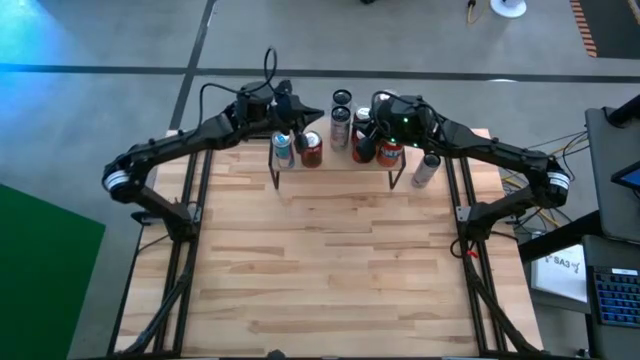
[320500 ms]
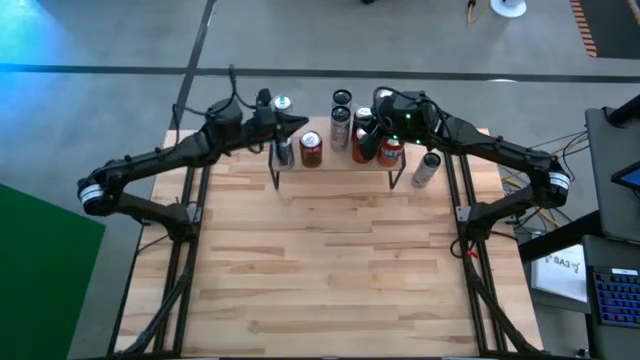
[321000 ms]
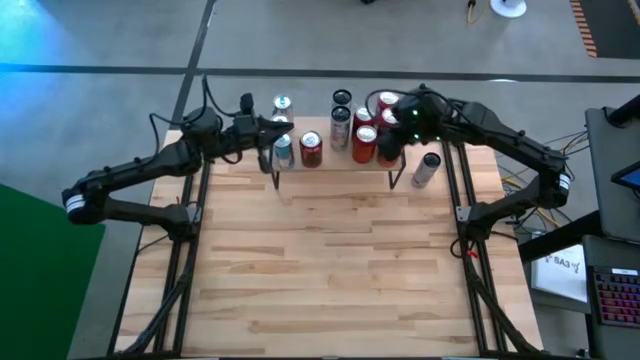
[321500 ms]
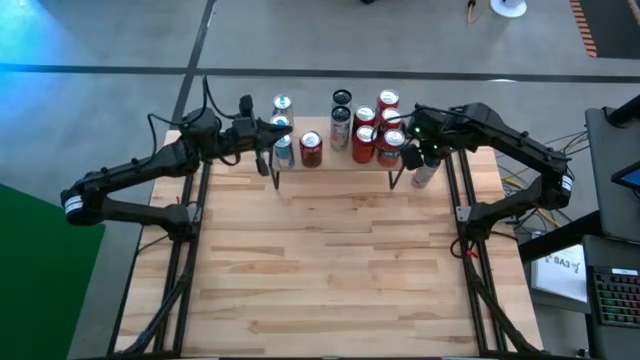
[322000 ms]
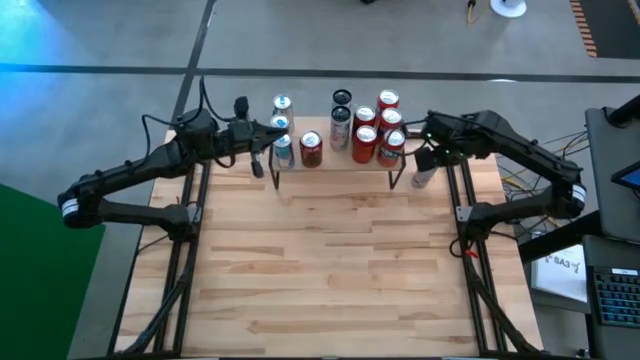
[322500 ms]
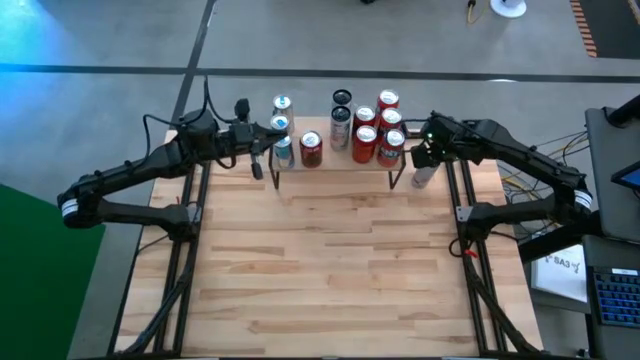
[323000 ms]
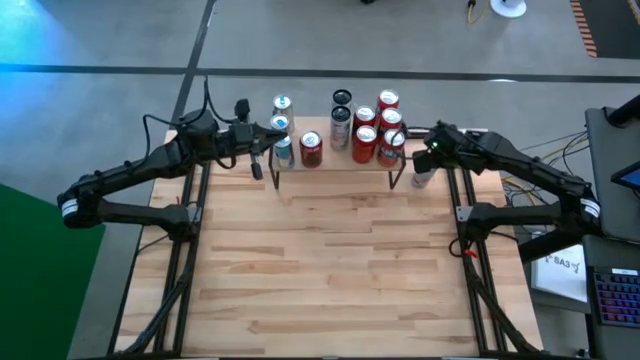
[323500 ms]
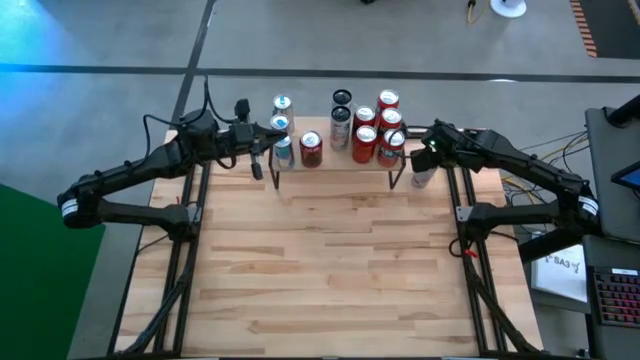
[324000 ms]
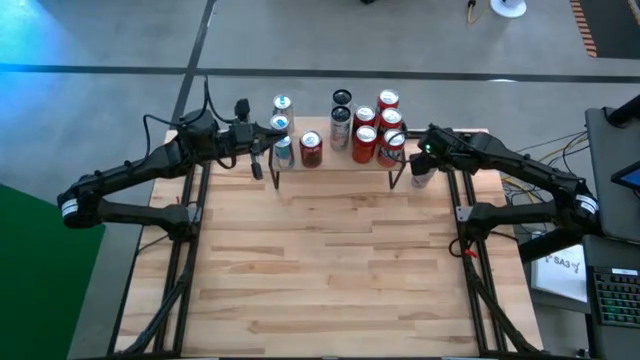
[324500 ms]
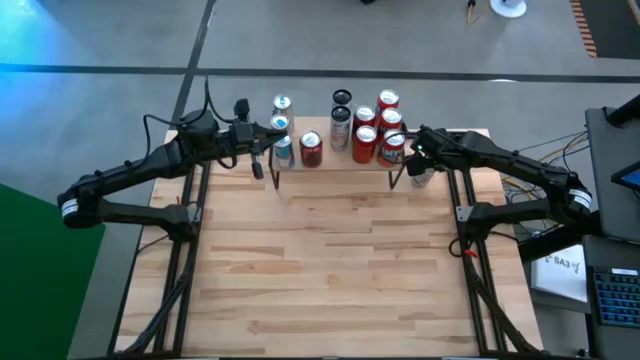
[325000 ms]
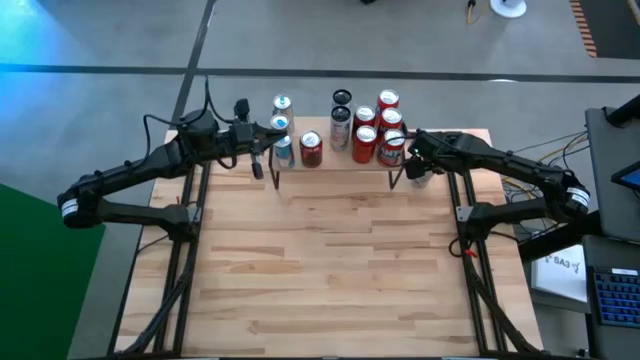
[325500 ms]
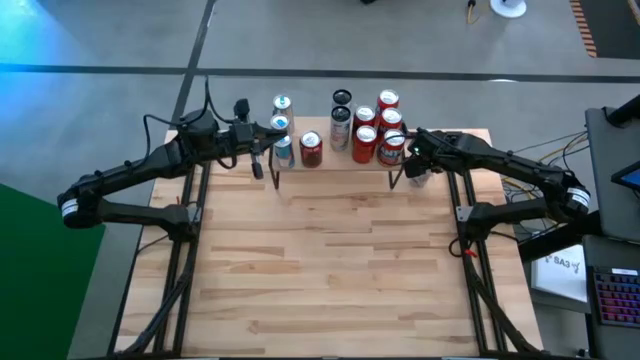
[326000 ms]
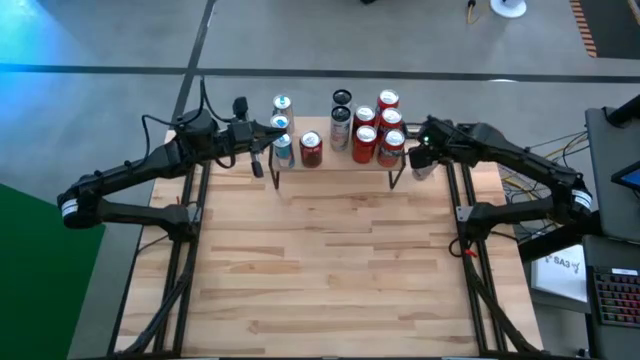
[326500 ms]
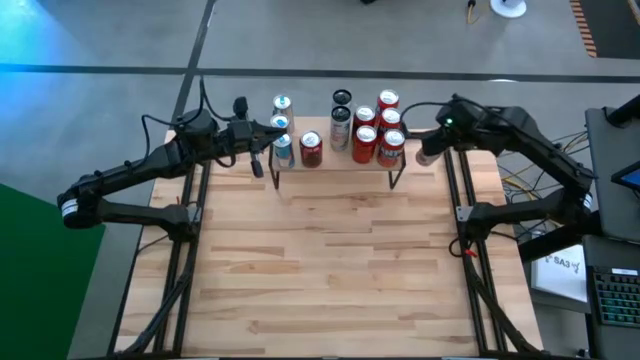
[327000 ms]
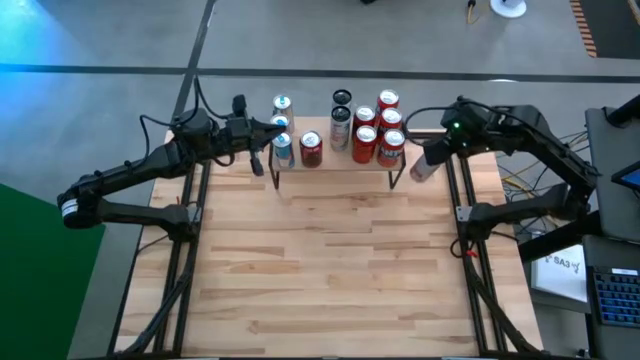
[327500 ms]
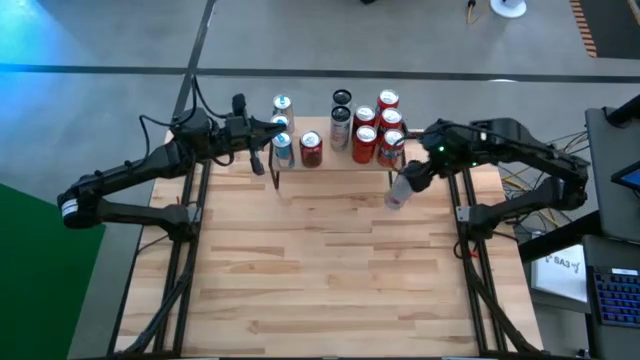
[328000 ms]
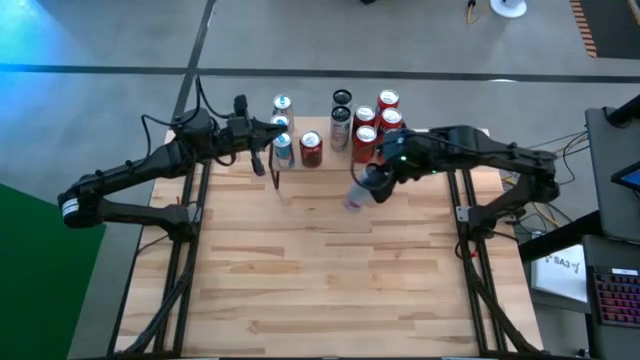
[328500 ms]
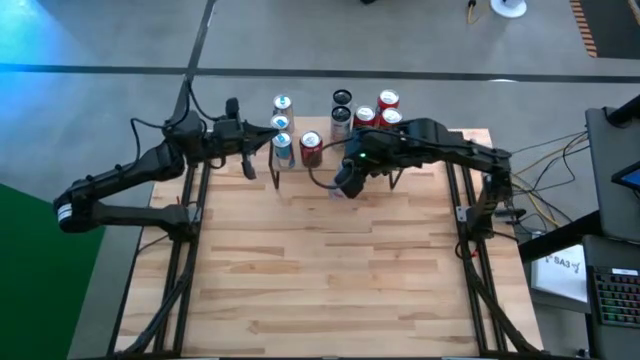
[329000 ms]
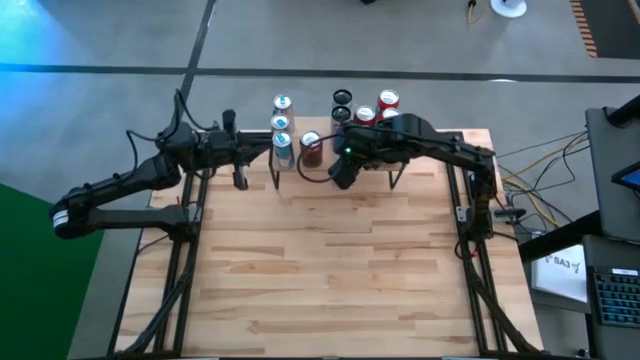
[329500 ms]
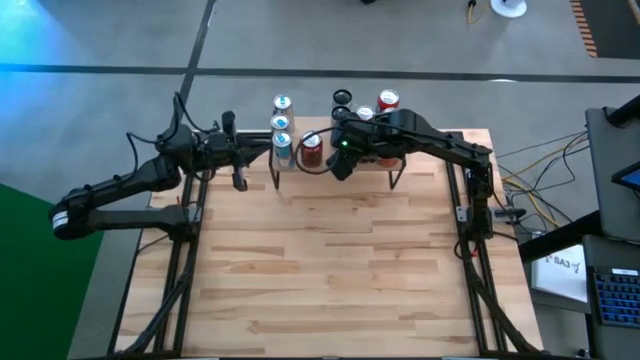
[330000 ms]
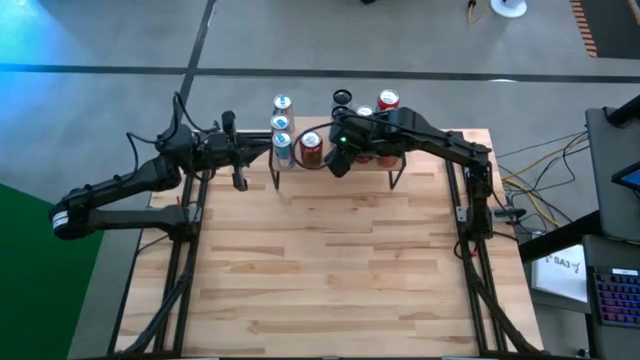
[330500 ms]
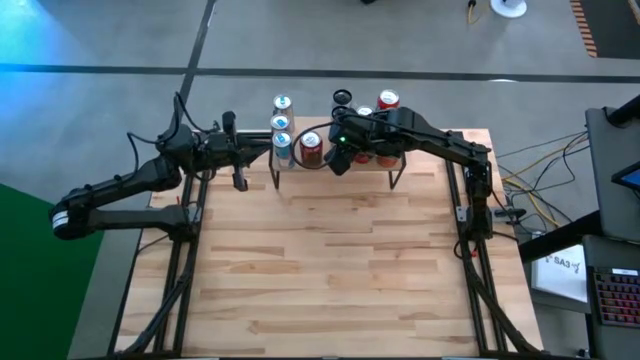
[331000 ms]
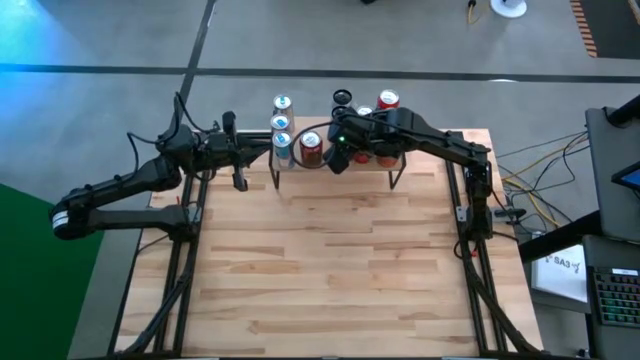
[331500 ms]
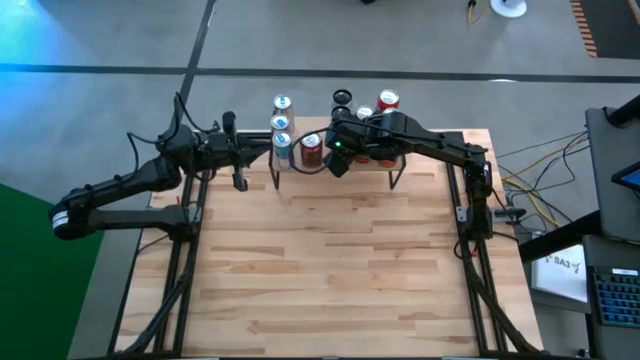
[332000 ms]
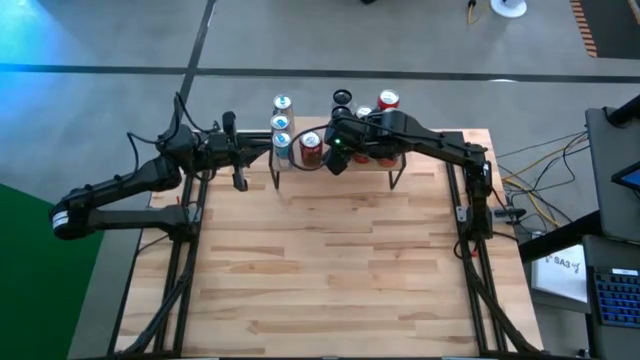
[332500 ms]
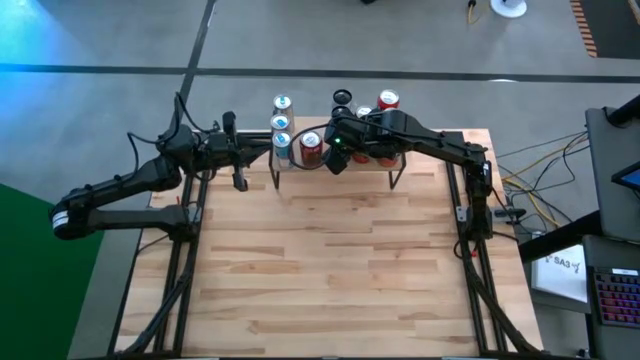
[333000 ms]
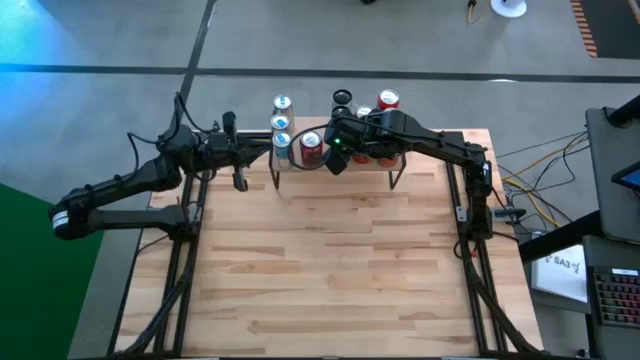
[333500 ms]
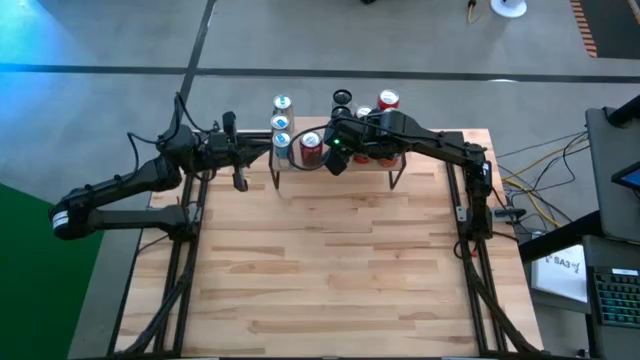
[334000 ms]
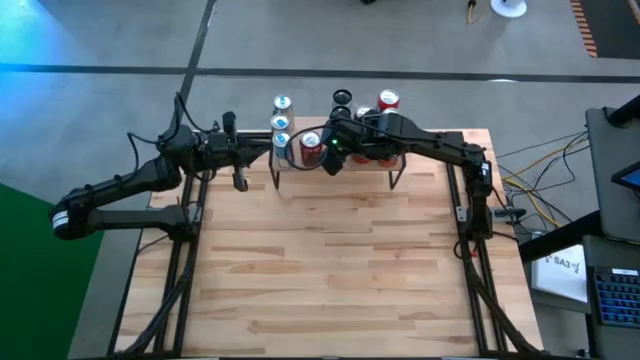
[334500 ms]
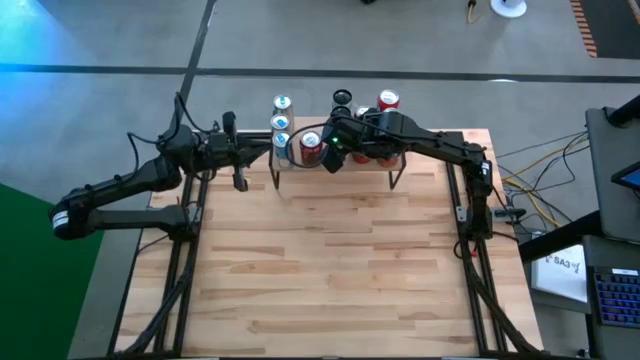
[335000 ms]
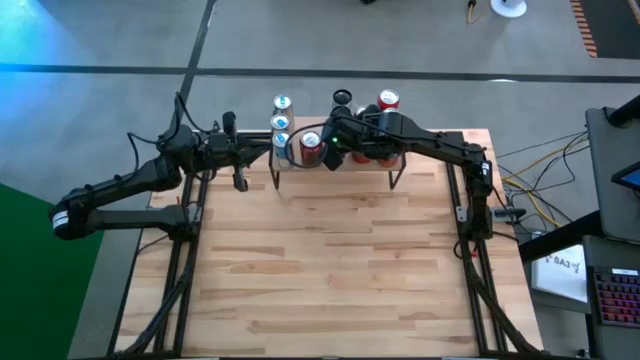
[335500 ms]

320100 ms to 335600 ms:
Task: Place canned beverage on shelf
Put the white pink soda can on the shelf

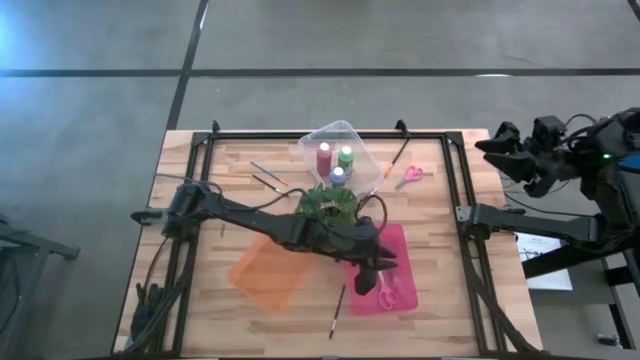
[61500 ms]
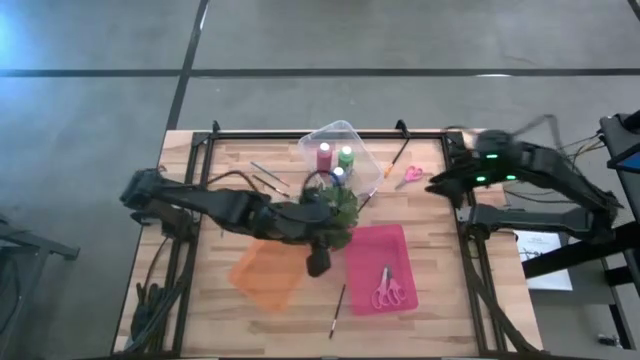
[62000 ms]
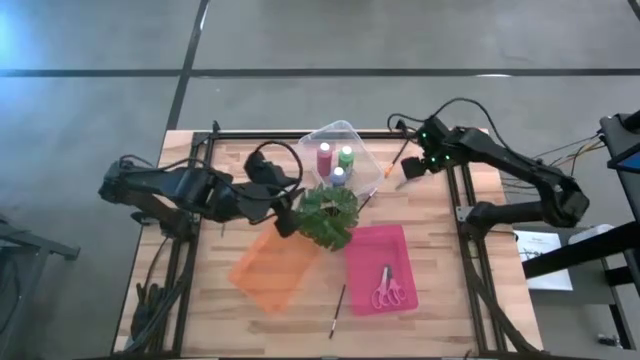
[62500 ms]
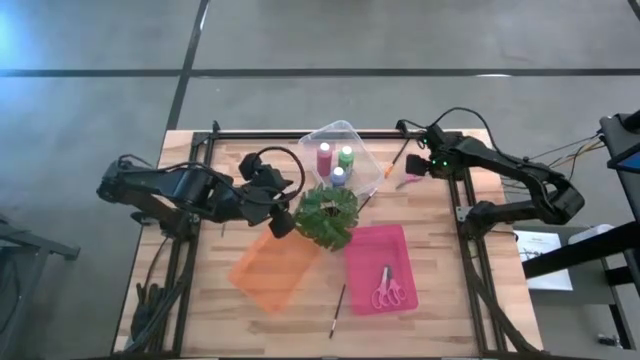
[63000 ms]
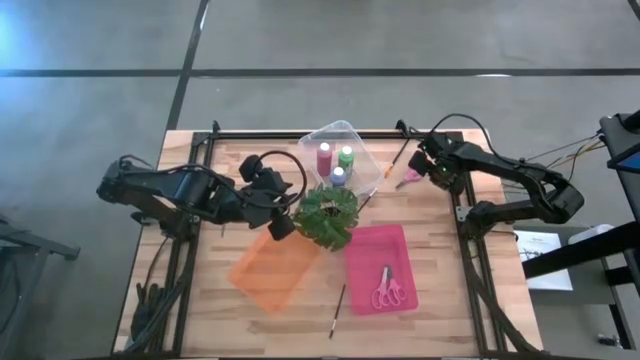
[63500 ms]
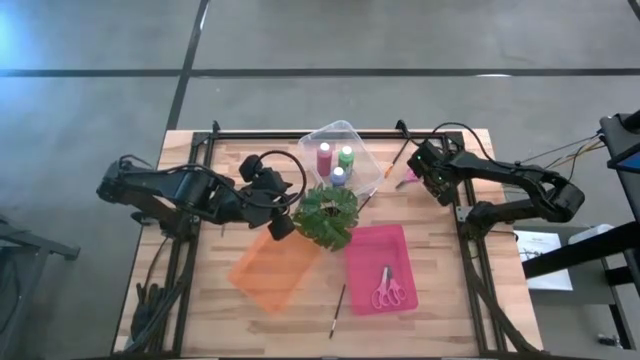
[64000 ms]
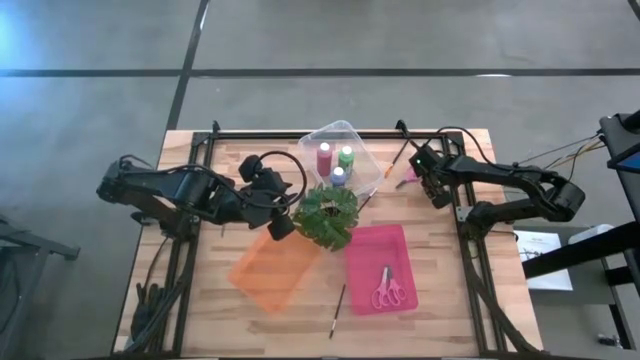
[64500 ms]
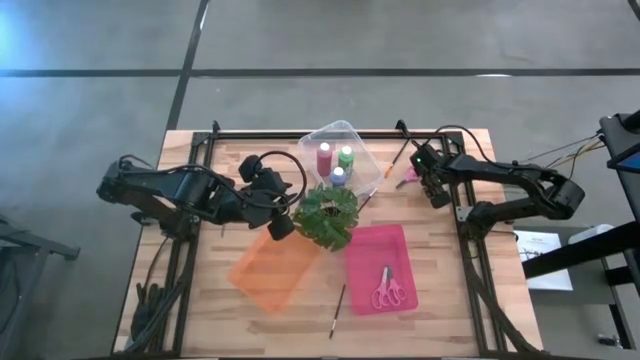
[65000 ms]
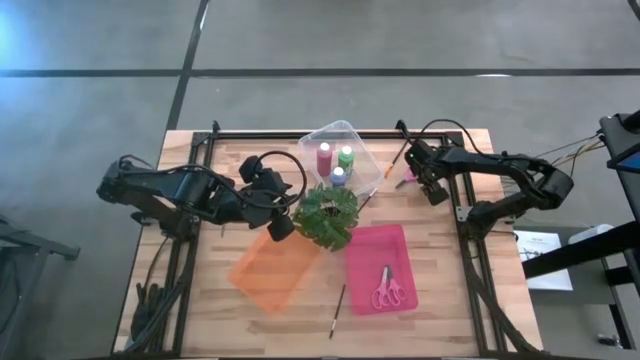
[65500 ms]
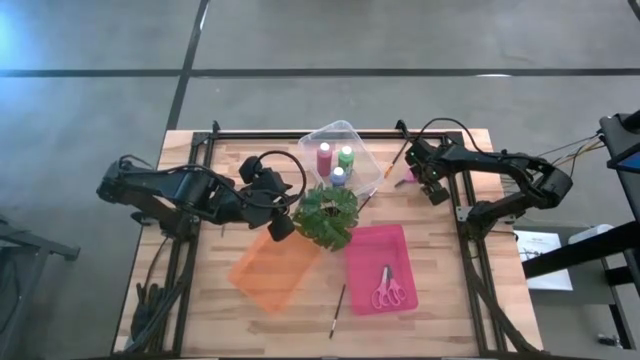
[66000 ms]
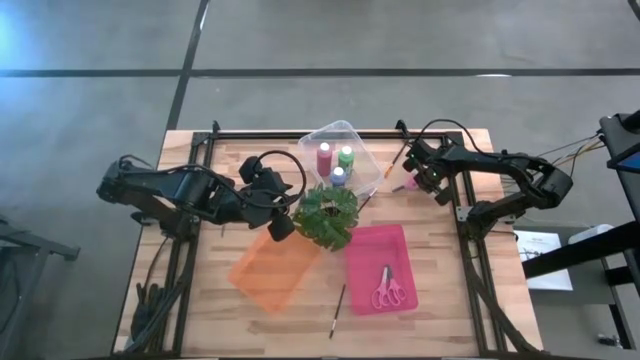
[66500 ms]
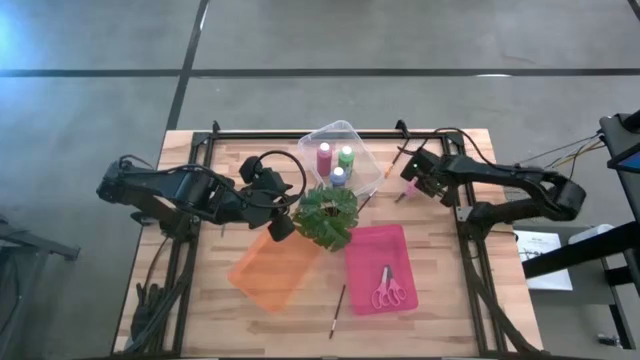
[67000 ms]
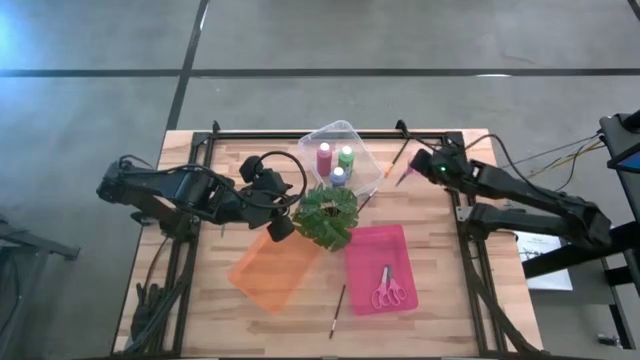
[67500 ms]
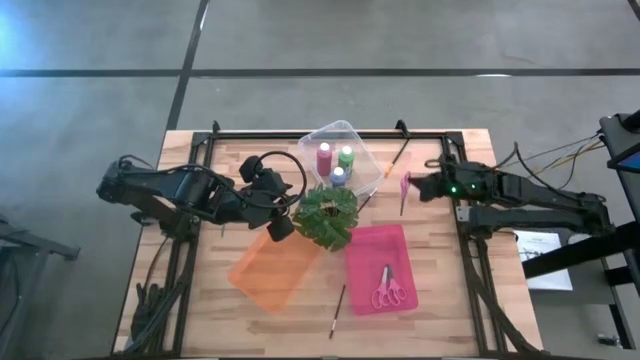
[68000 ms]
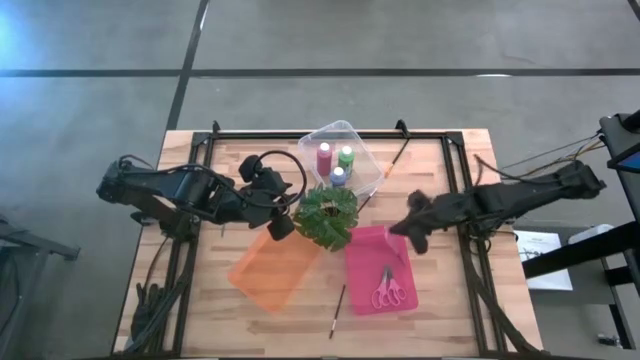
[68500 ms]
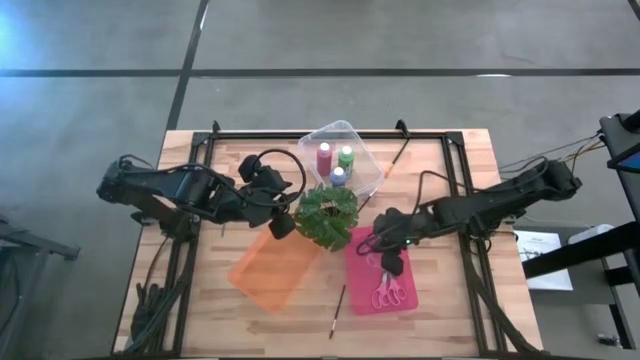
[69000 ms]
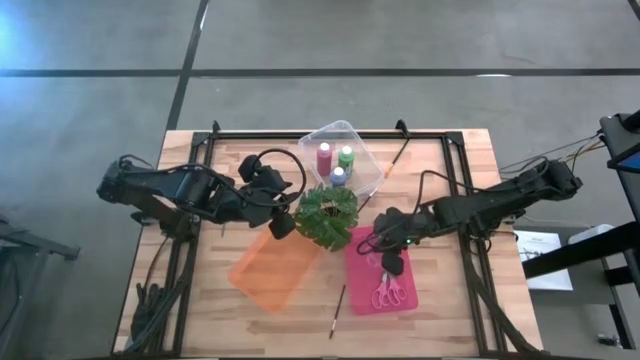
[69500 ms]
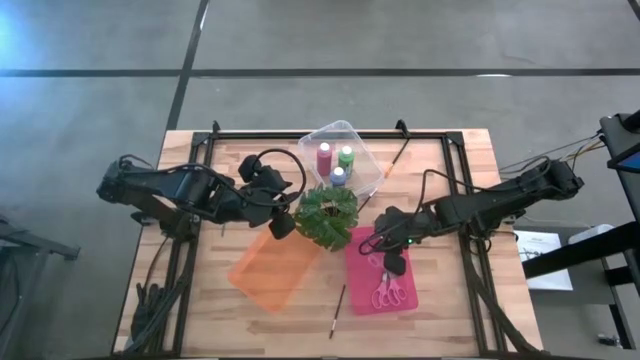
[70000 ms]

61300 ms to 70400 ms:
Task: Pick & Place Paint Supplies
Put the pink scissor into the pink bin
